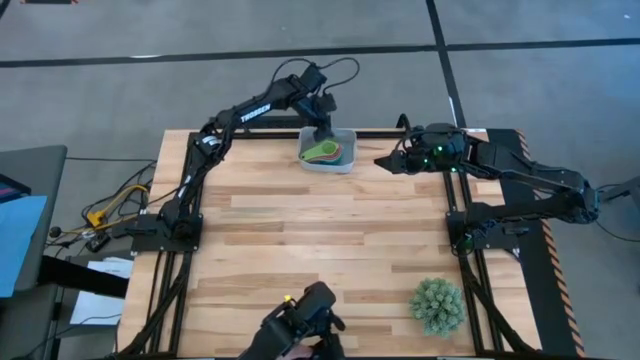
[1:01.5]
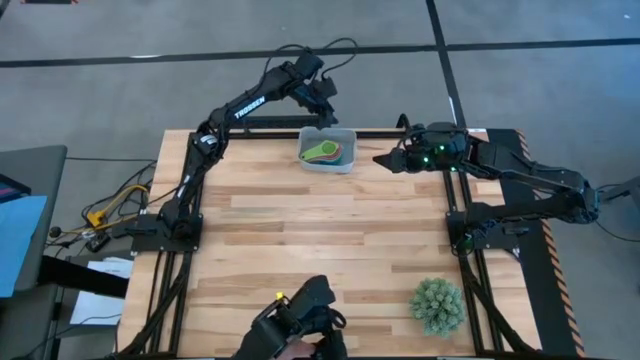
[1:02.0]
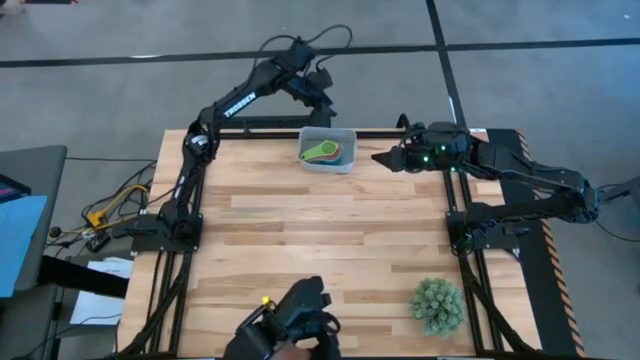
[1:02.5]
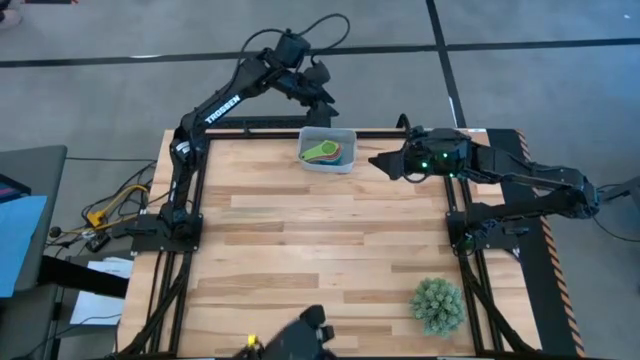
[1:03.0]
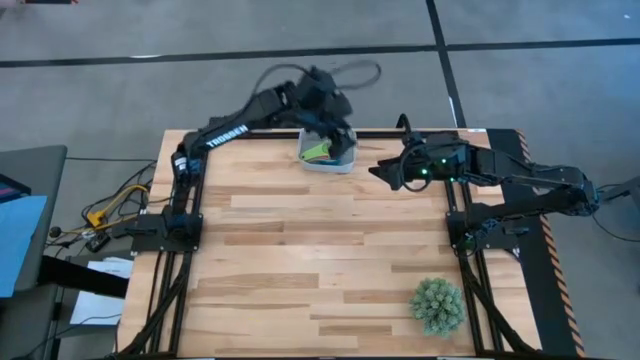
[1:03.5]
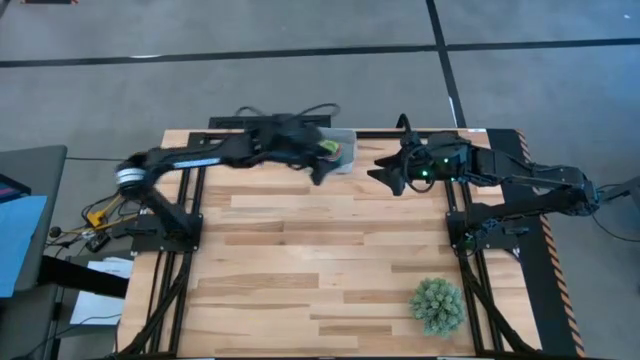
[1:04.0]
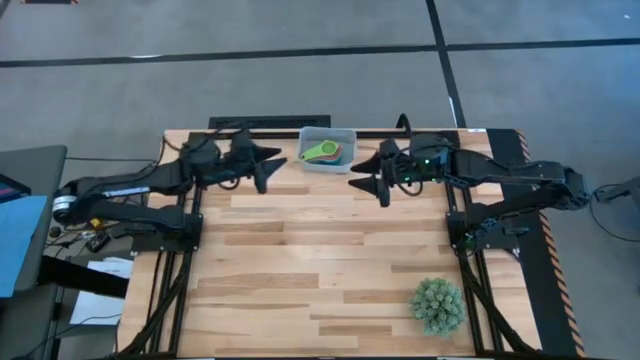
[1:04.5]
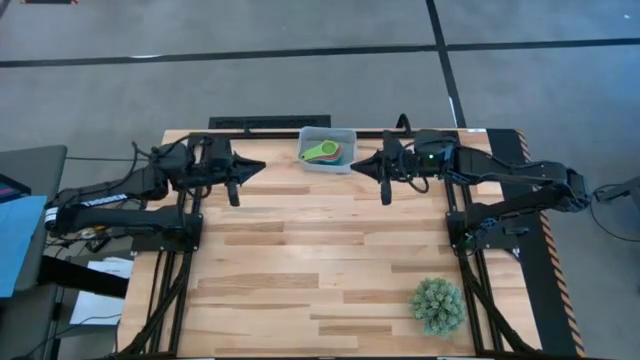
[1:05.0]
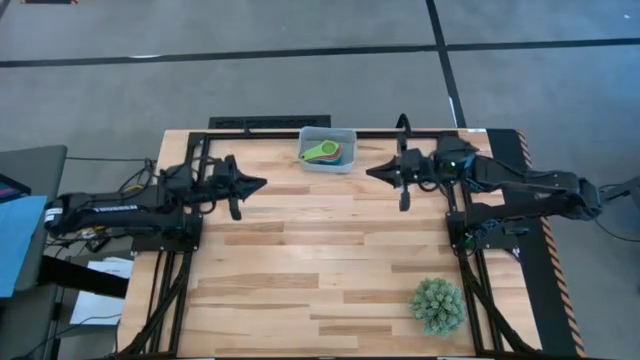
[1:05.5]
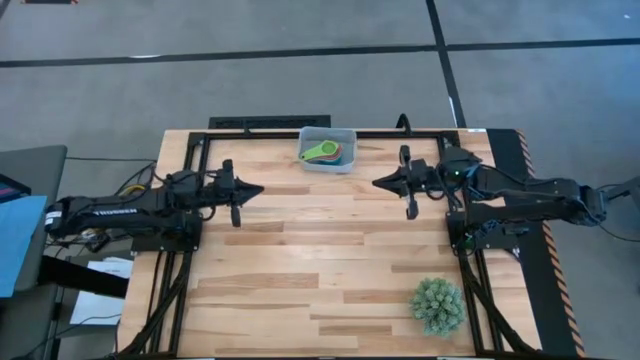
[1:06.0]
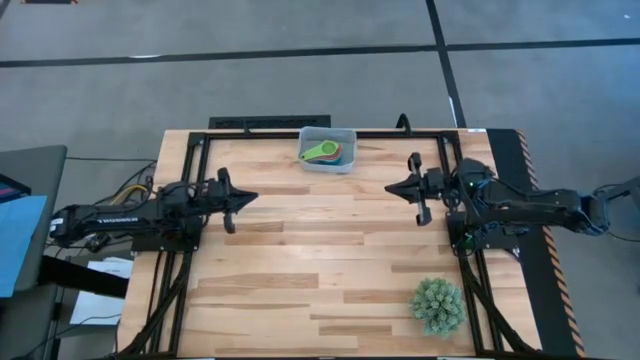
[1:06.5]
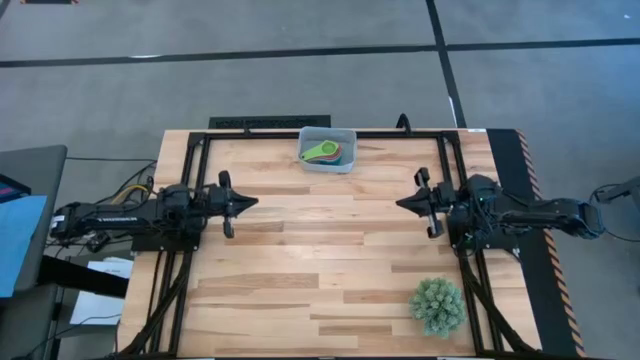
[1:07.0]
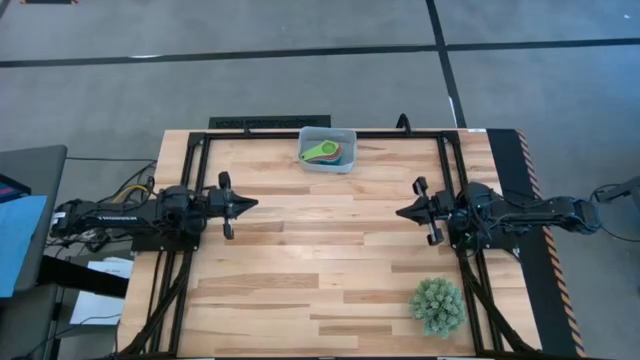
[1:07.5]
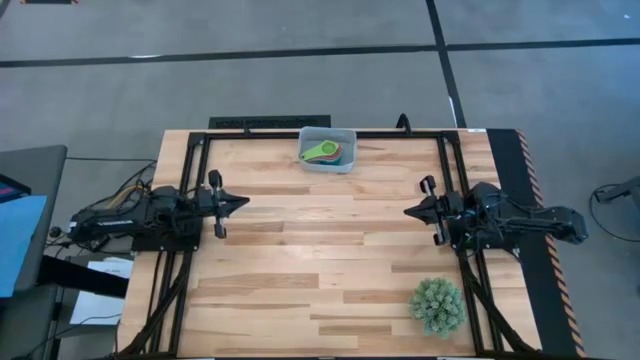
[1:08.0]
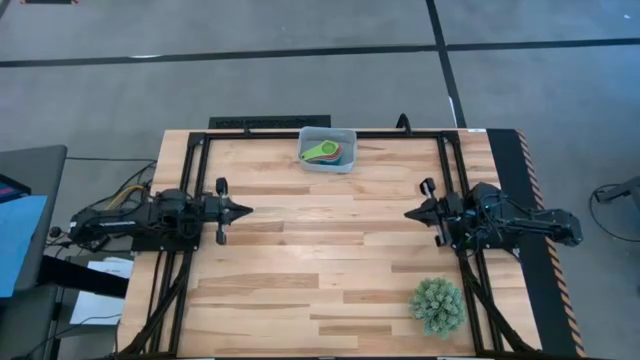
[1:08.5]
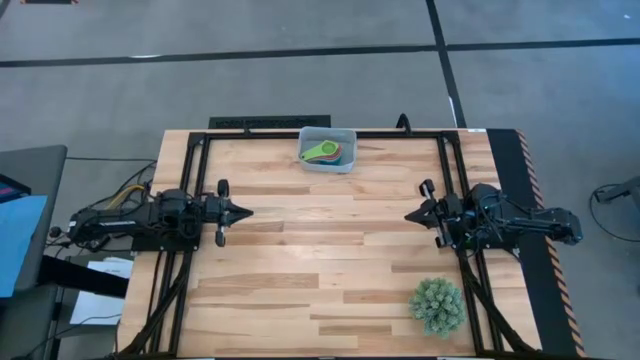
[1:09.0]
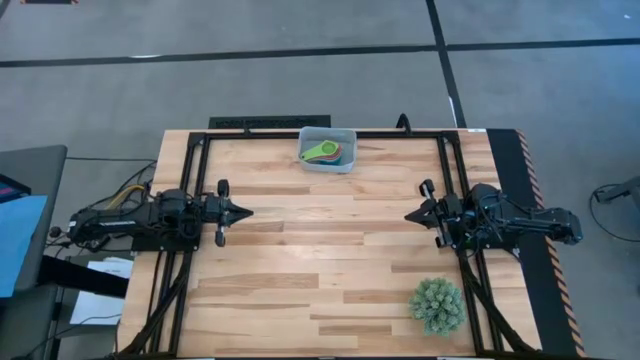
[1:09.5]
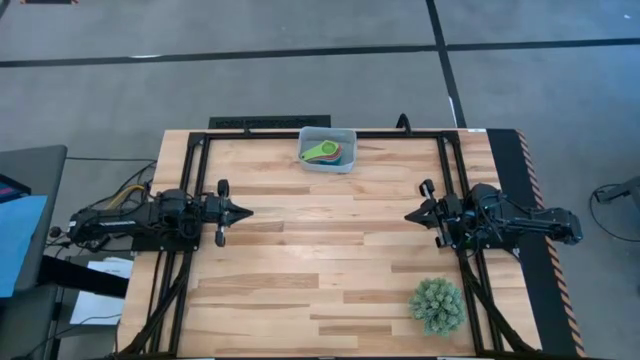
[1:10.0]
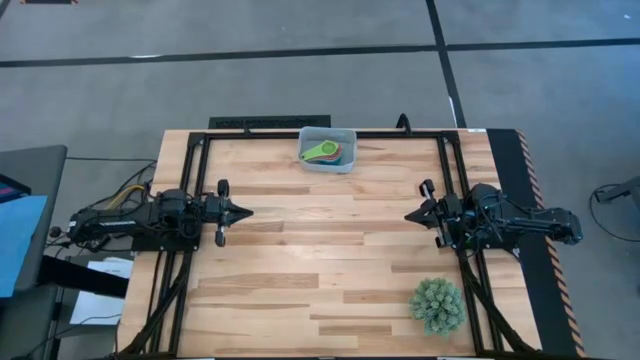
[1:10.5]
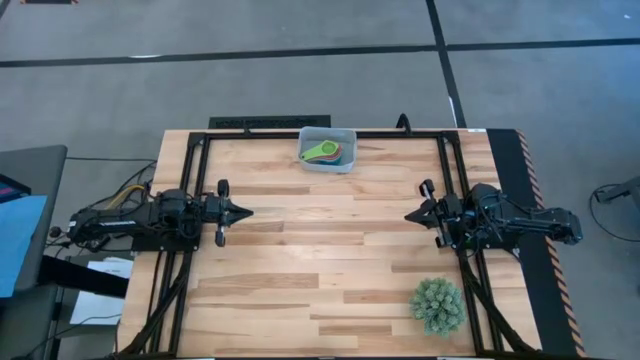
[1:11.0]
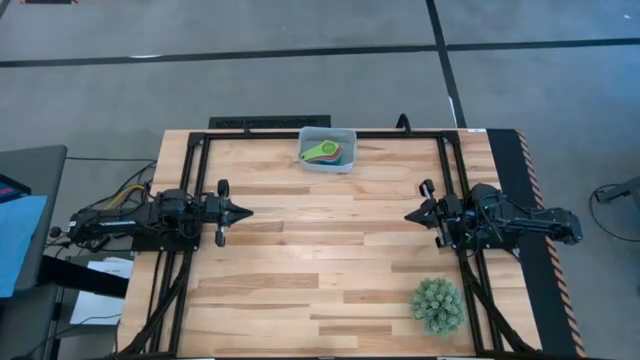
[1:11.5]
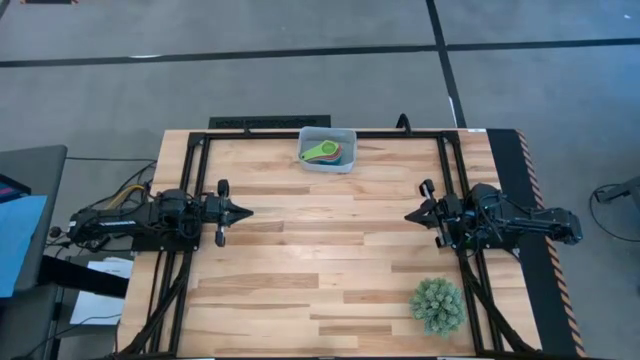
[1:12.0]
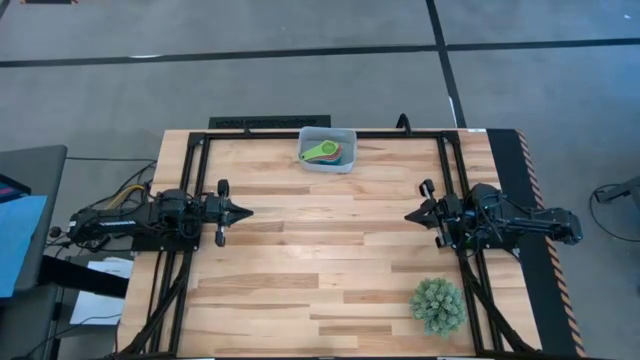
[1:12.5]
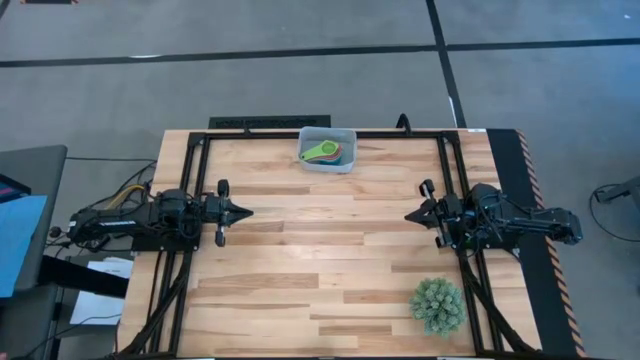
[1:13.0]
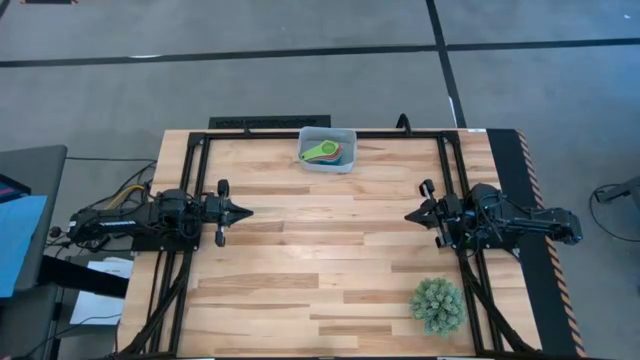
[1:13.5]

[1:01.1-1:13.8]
Task: Nest measuring cups in basket
Return to Home Position

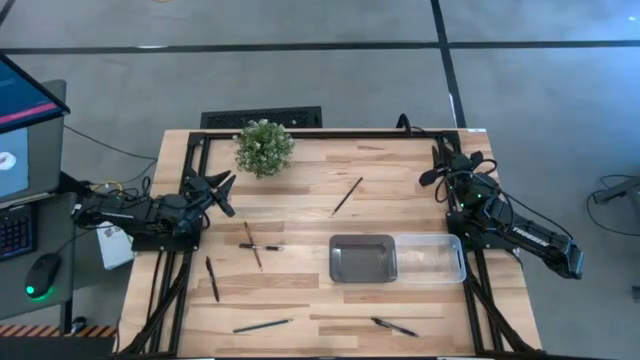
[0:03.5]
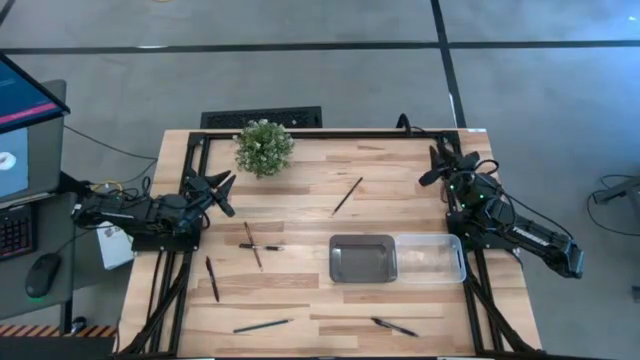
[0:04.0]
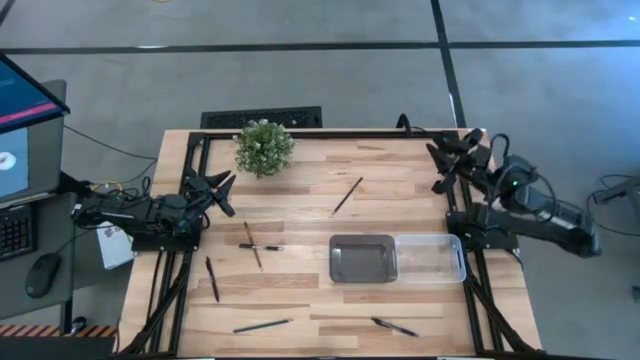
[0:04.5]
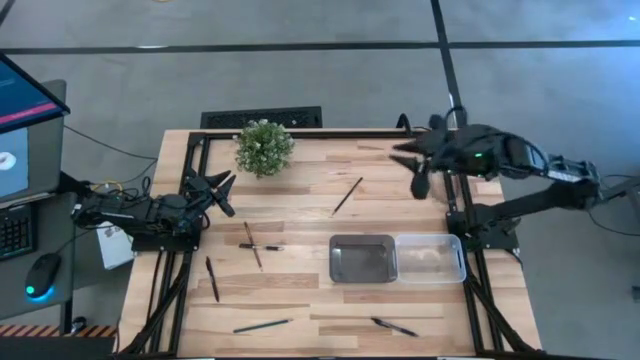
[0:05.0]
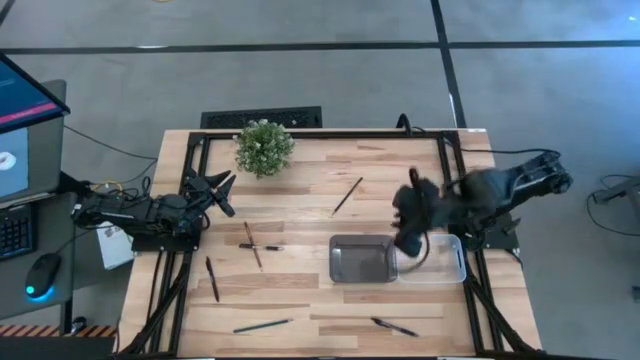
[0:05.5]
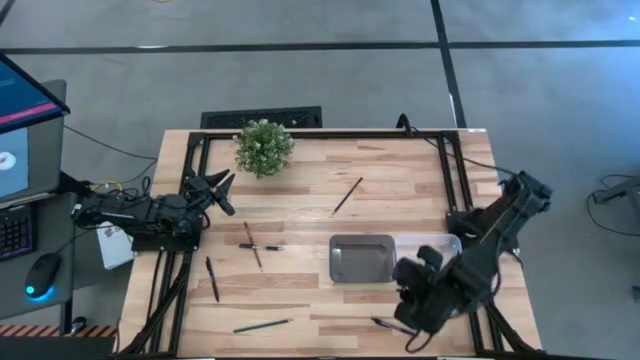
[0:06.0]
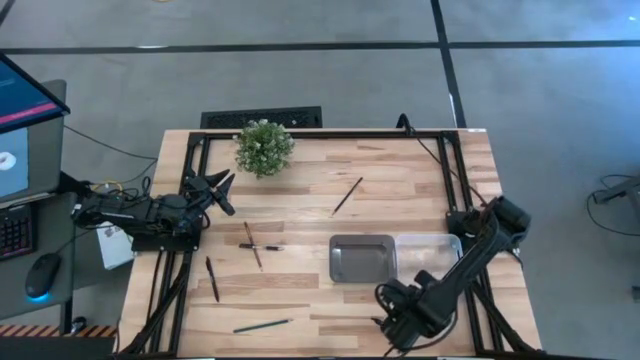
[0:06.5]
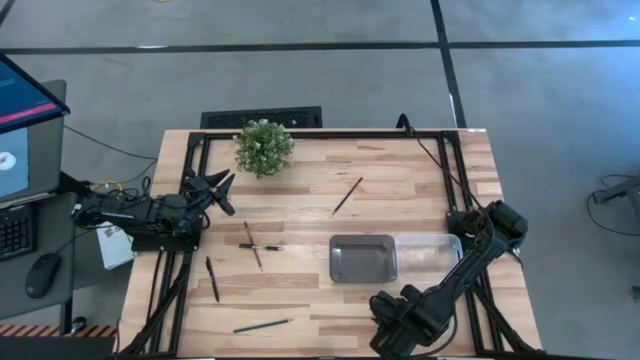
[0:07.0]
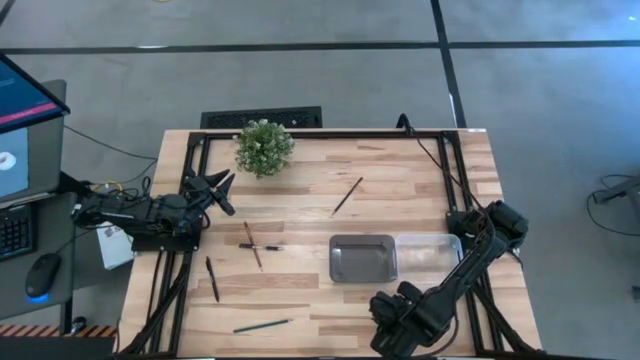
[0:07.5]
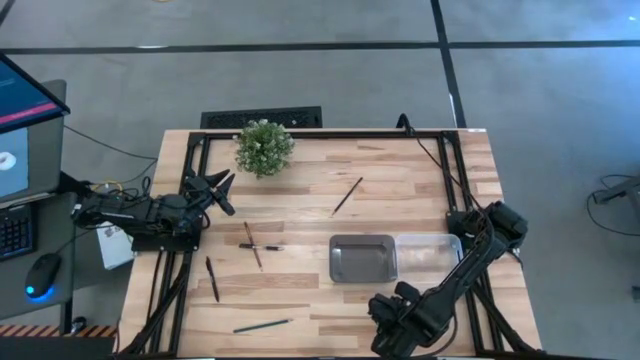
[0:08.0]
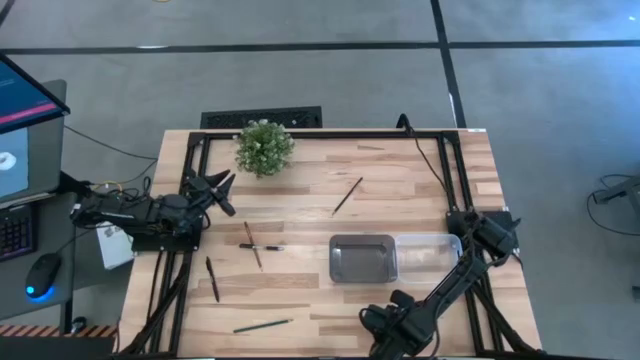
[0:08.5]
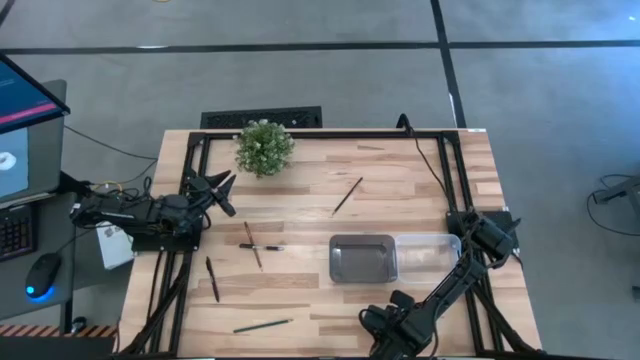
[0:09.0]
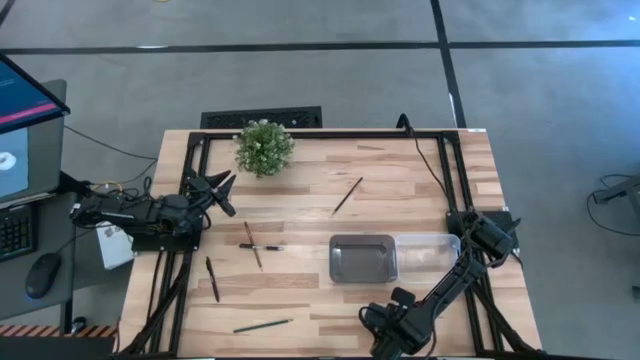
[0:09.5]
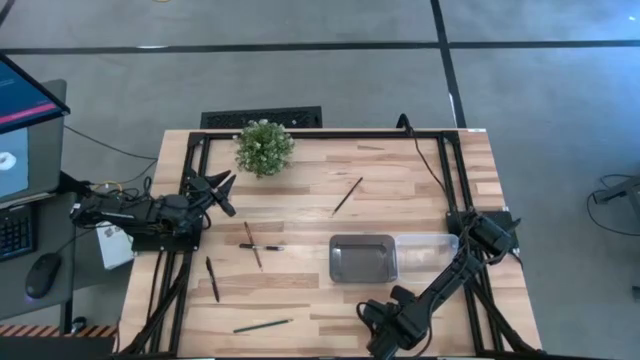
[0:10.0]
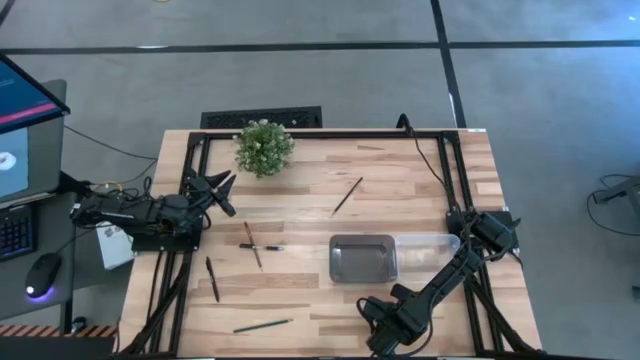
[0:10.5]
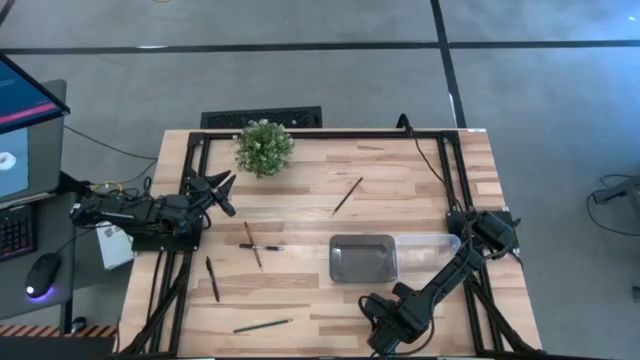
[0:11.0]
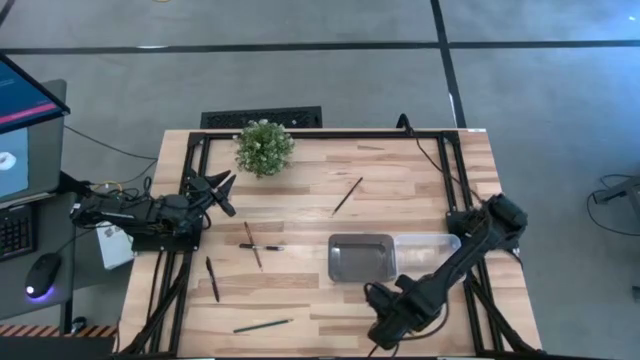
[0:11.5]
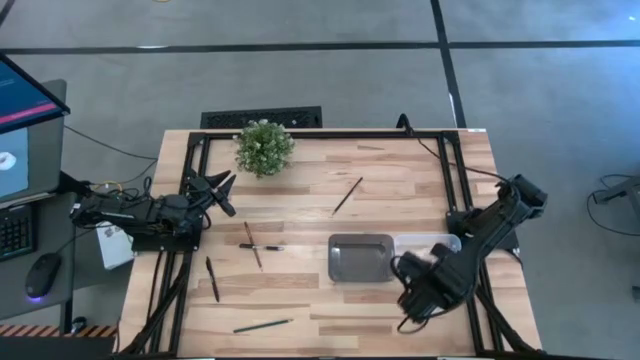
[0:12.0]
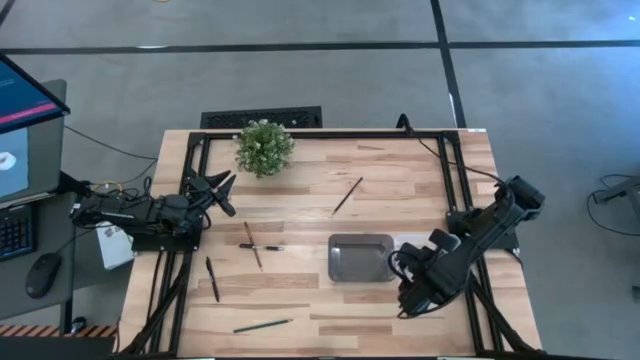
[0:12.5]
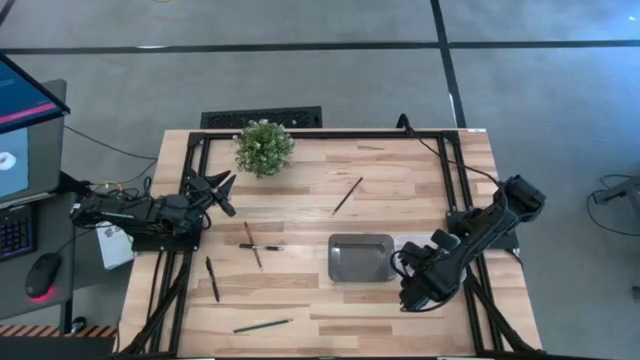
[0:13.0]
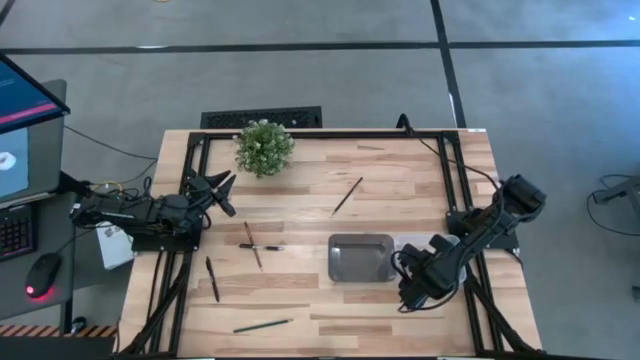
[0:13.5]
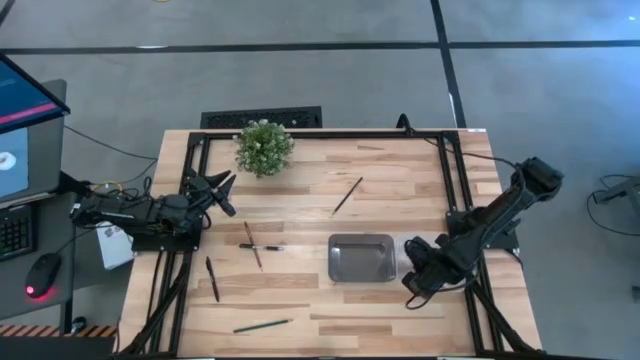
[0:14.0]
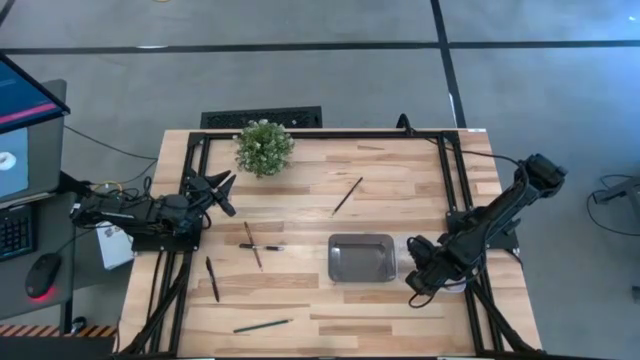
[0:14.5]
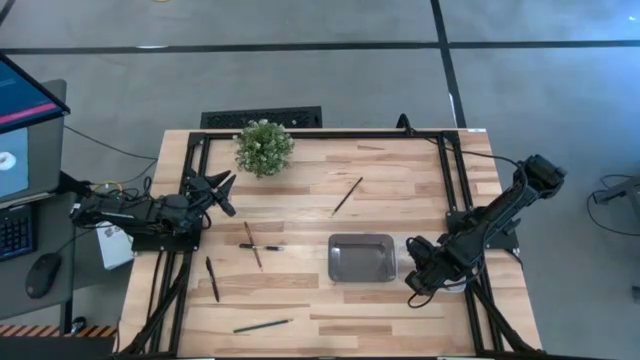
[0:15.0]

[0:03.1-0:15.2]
Task: Sort pens & pencils
Put the bottom black pen into the transparent bin
